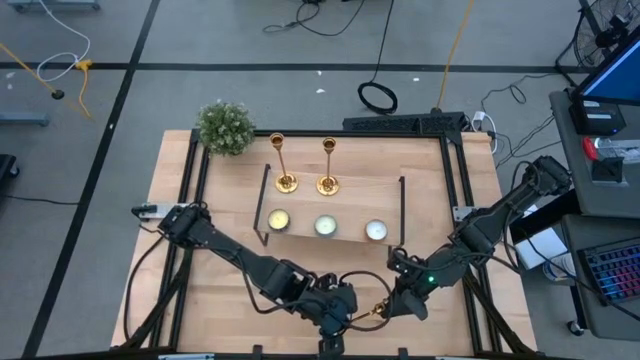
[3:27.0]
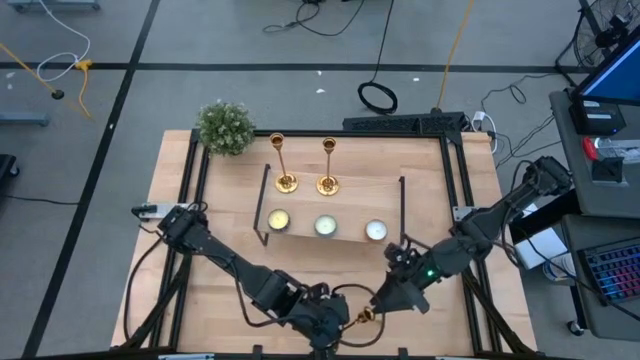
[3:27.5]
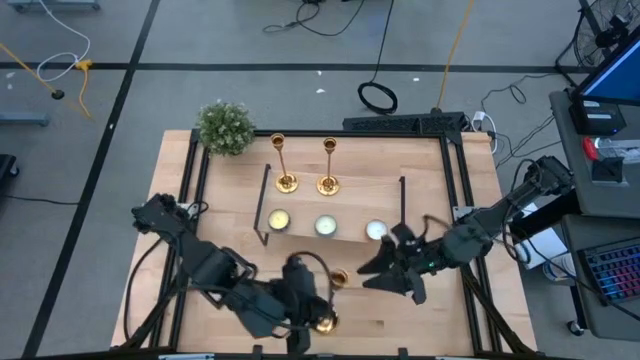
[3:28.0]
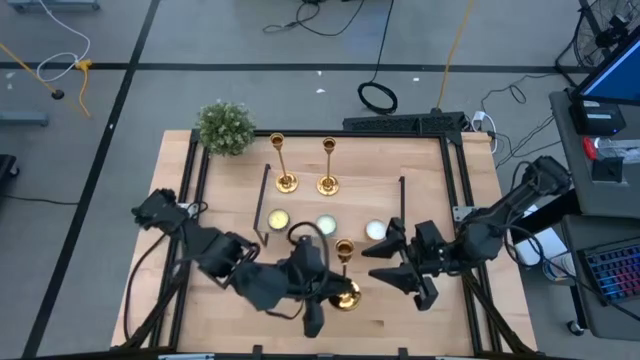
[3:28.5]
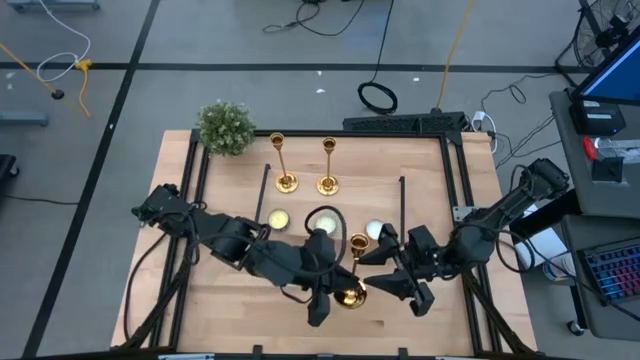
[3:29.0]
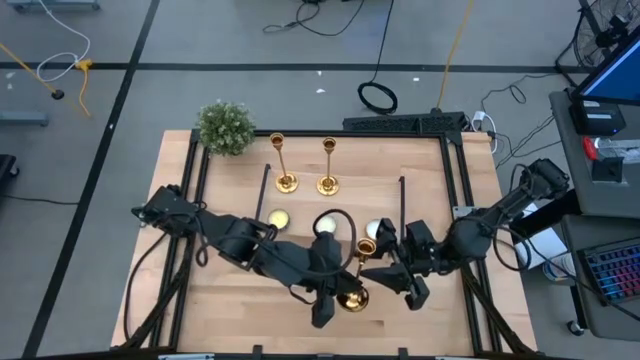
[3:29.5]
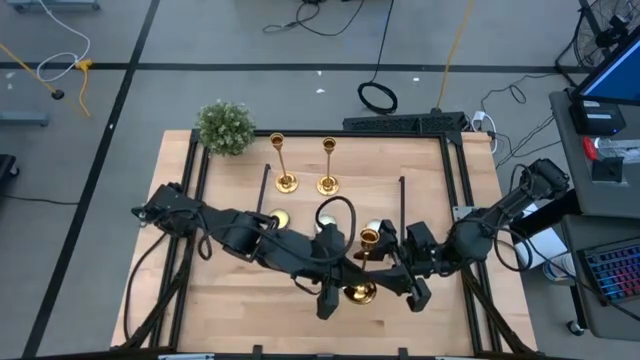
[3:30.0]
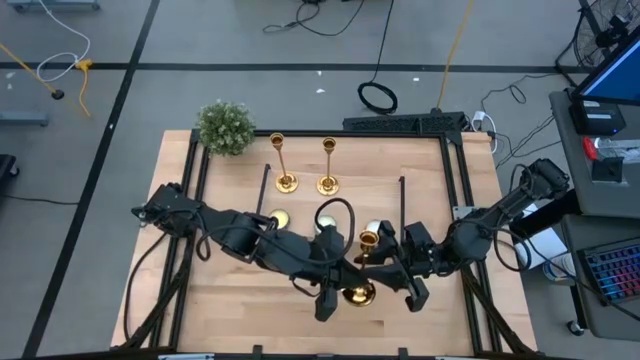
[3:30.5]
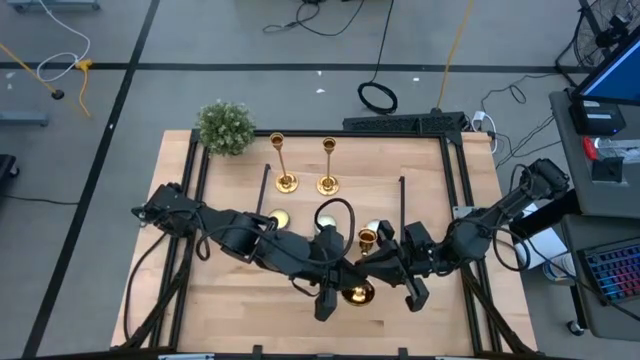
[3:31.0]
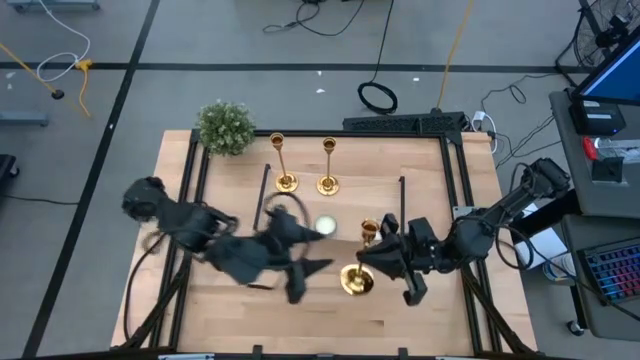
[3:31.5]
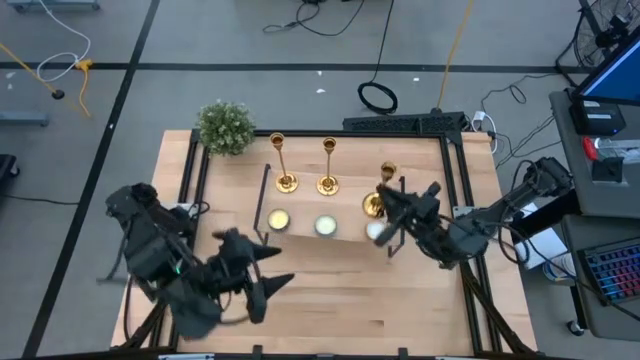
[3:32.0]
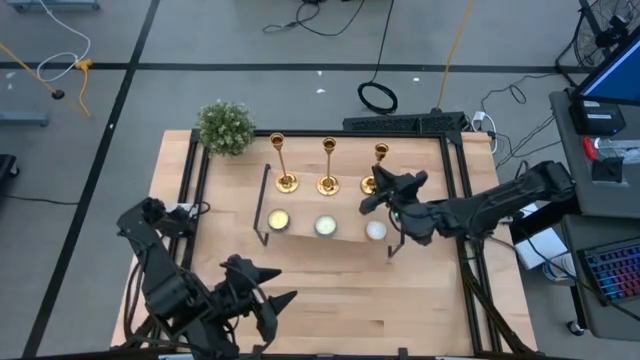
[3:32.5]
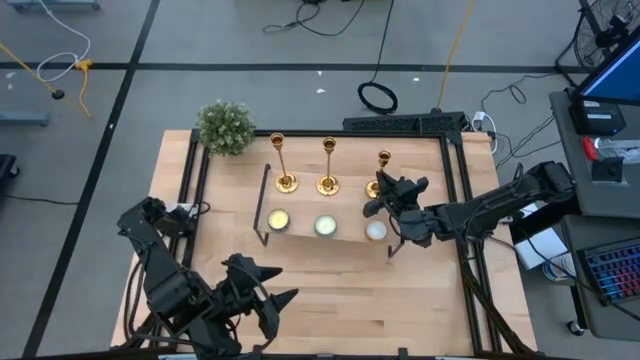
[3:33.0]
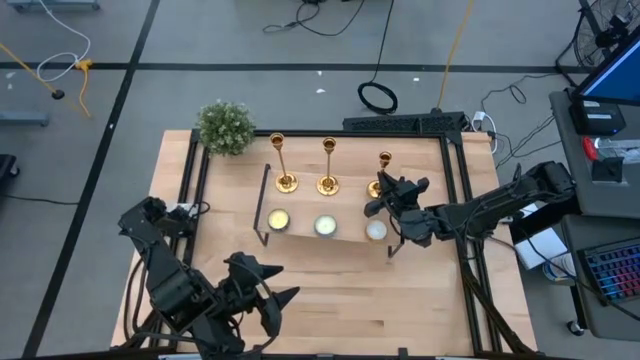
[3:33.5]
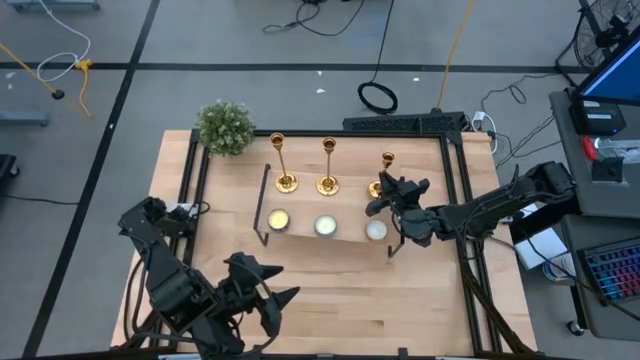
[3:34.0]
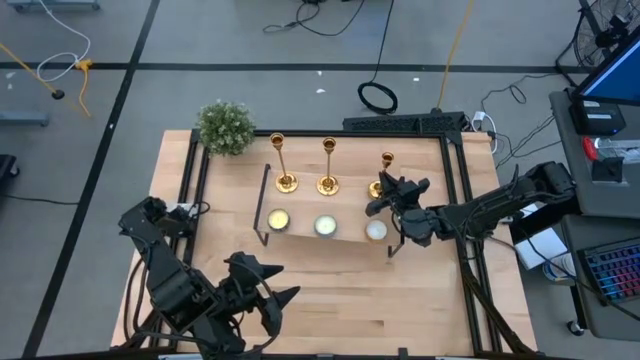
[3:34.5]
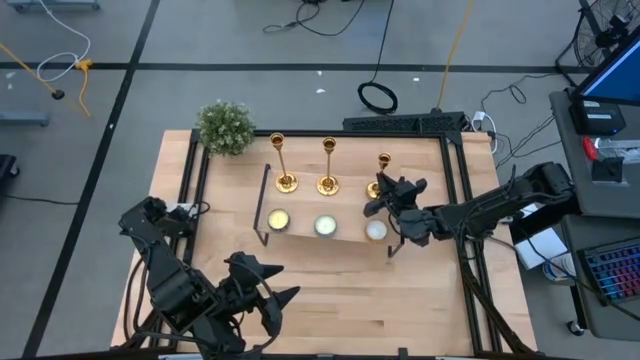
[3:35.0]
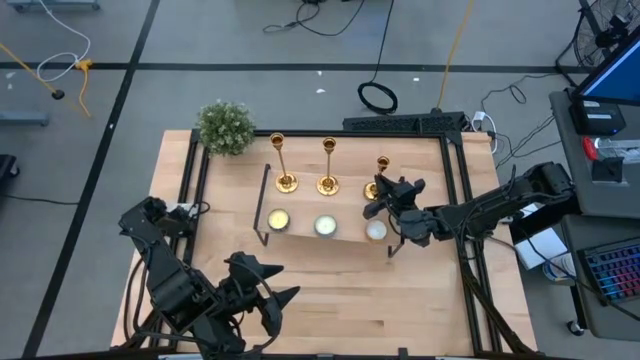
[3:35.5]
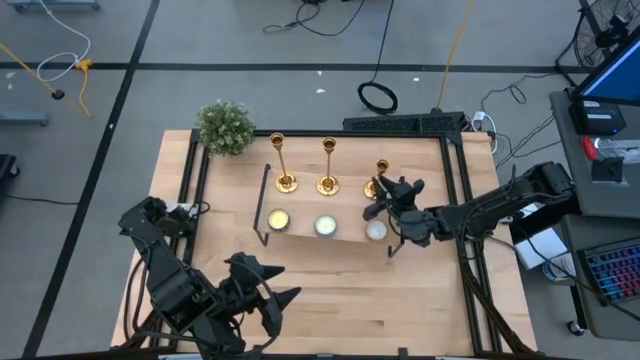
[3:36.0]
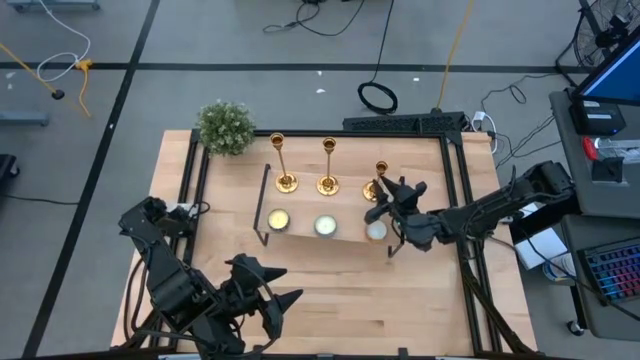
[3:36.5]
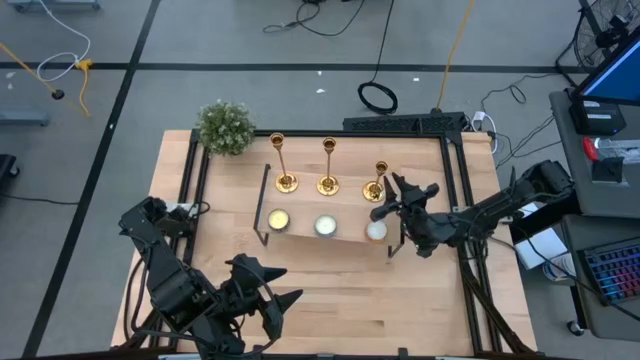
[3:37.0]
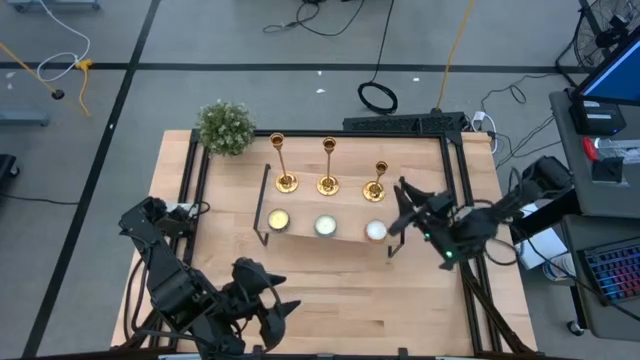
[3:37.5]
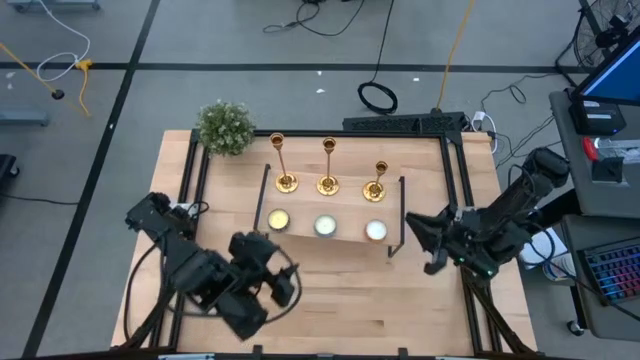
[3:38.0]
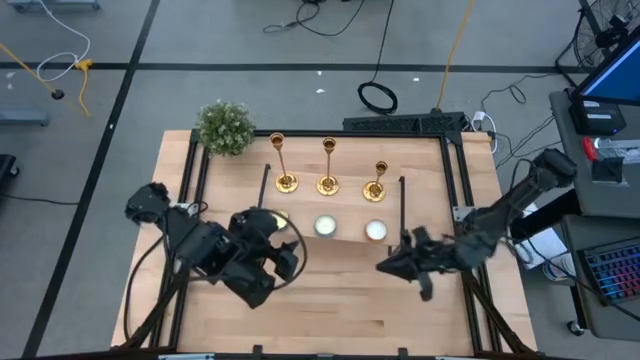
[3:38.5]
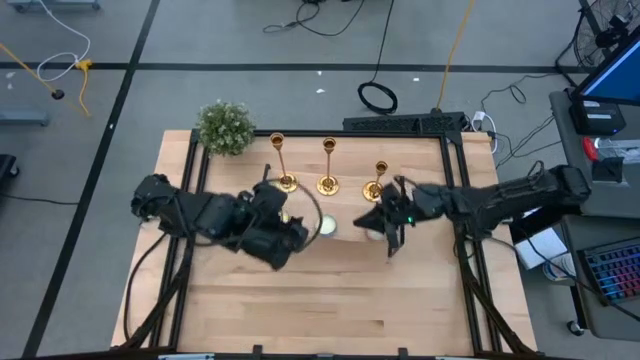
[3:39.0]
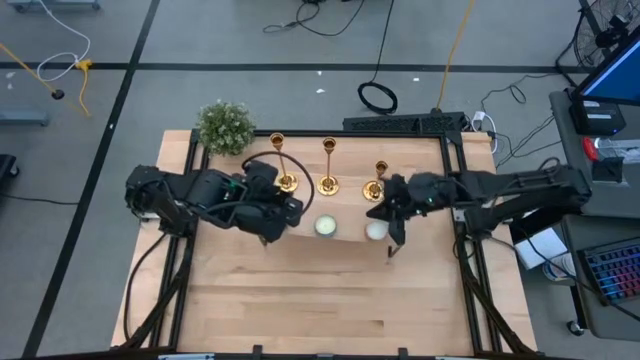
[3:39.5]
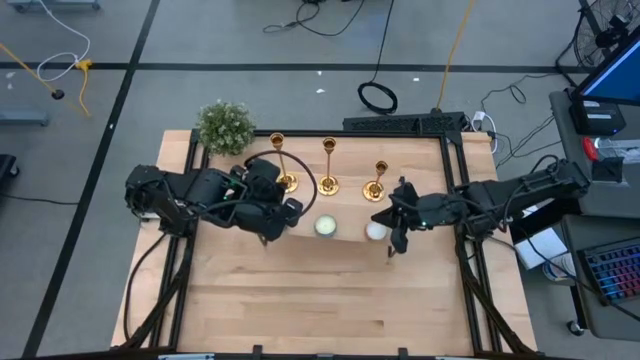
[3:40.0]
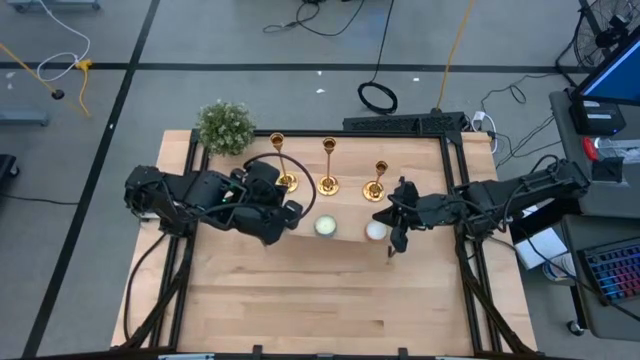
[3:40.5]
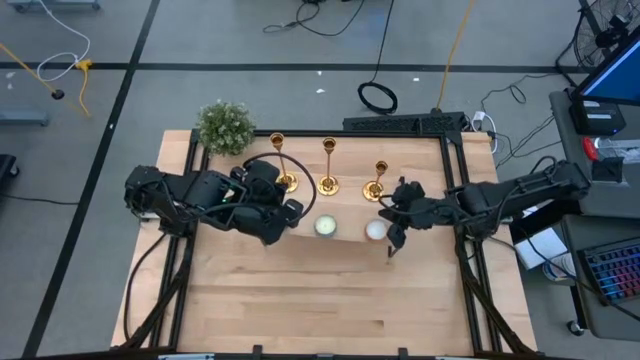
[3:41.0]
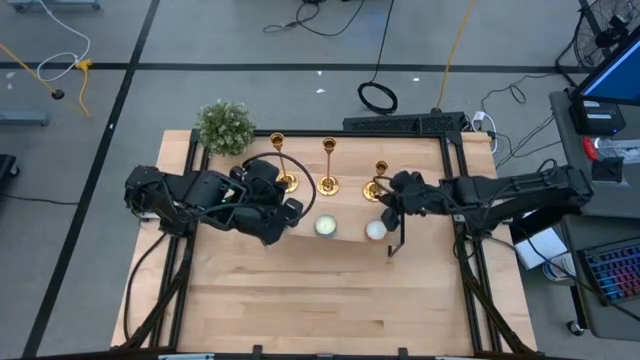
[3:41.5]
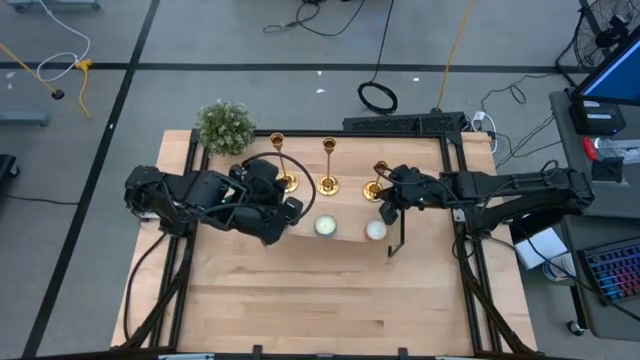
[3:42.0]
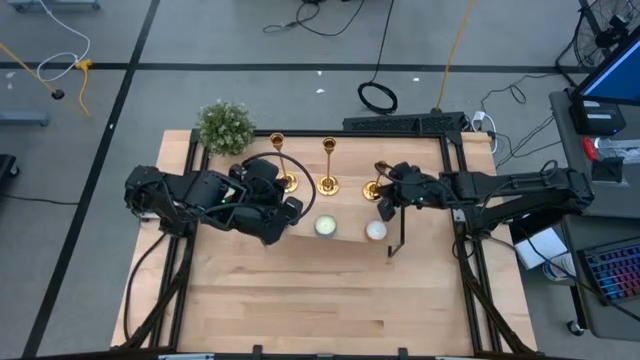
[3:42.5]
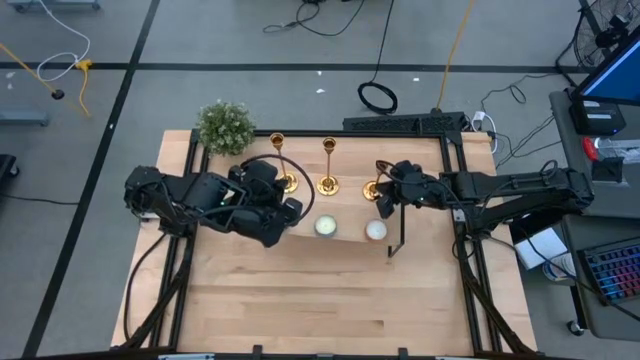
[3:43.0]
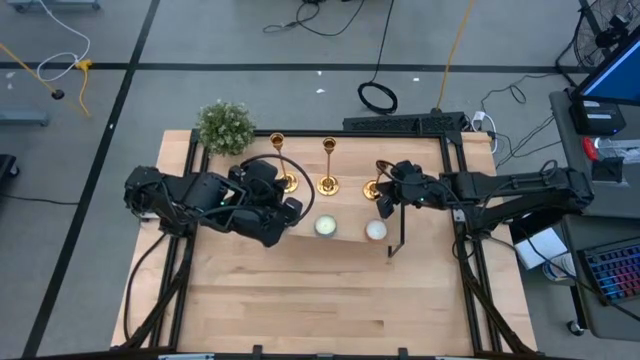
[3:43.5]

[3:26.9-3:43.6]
Task: Pick & Place candle stick holders
Put the gold candle holder onto the shelf
